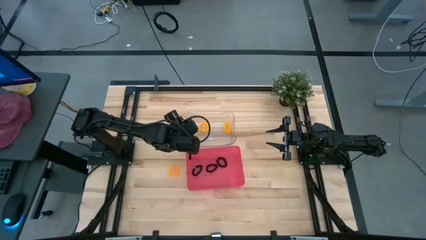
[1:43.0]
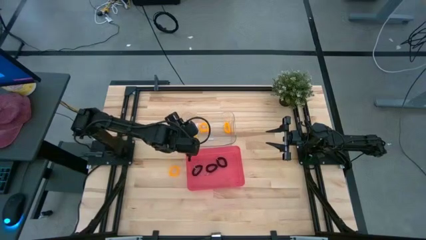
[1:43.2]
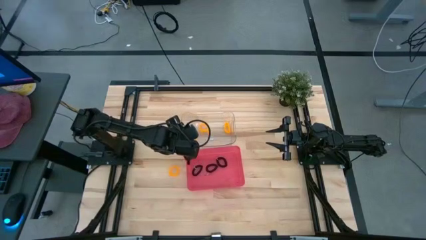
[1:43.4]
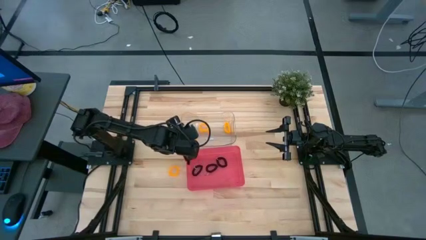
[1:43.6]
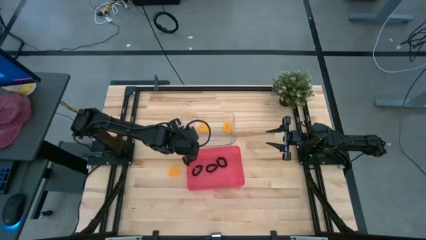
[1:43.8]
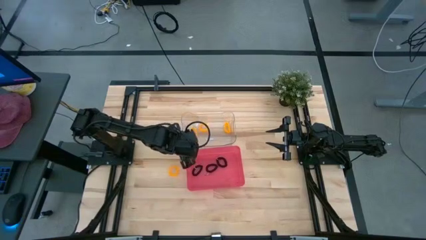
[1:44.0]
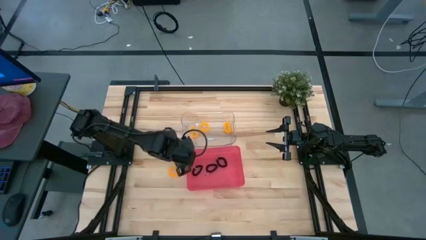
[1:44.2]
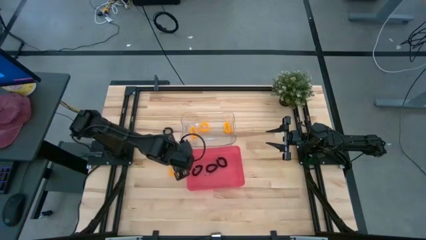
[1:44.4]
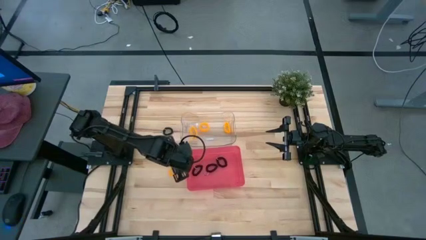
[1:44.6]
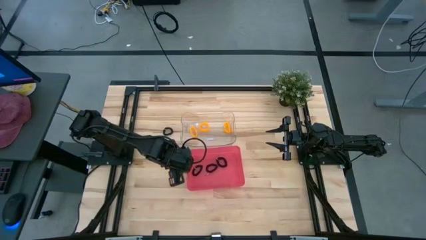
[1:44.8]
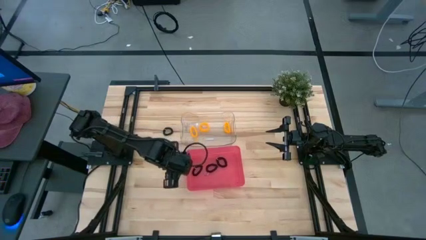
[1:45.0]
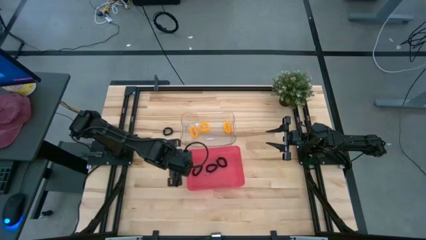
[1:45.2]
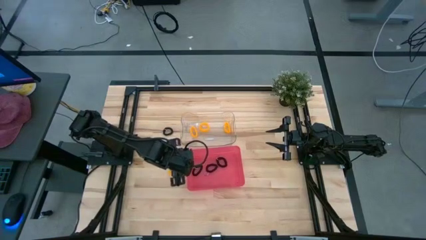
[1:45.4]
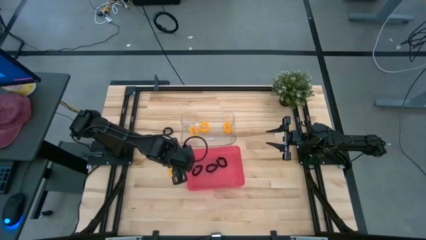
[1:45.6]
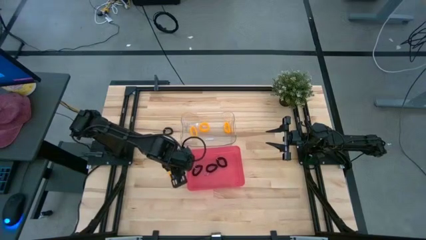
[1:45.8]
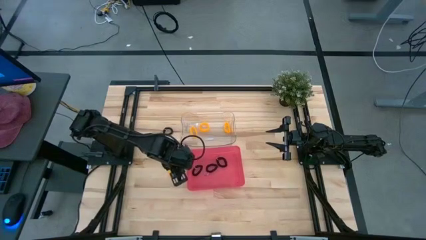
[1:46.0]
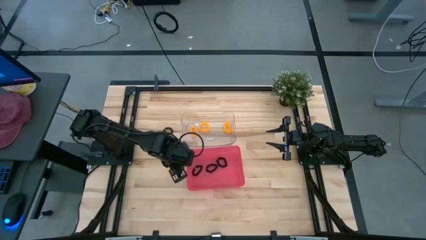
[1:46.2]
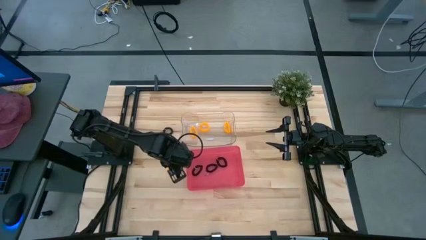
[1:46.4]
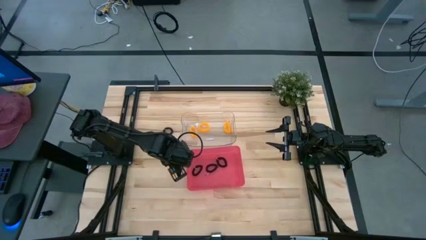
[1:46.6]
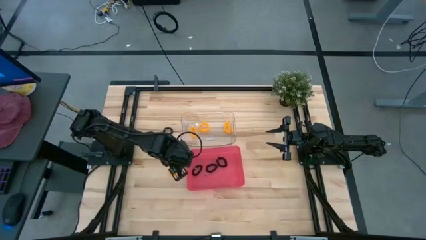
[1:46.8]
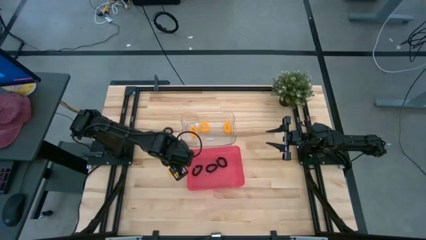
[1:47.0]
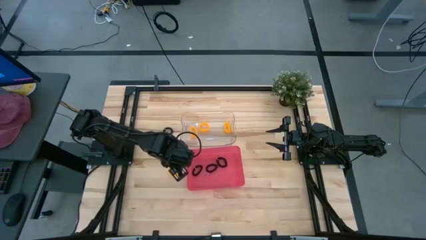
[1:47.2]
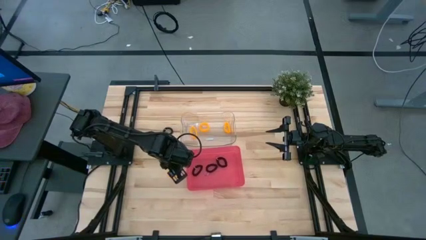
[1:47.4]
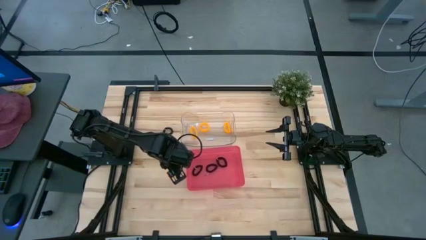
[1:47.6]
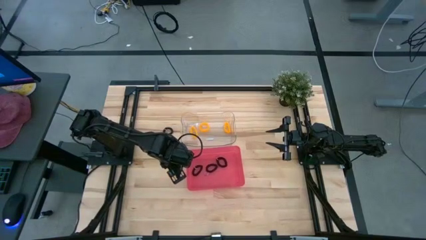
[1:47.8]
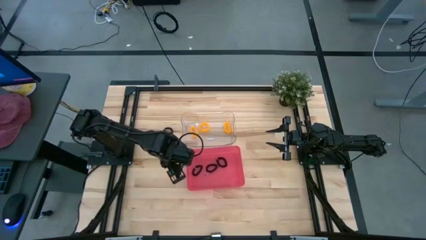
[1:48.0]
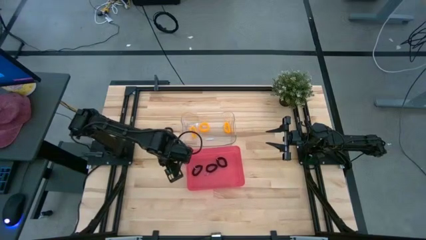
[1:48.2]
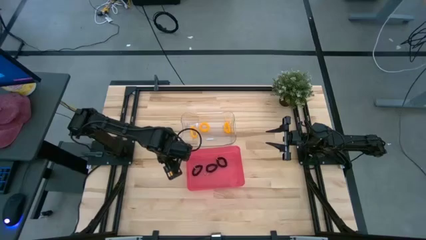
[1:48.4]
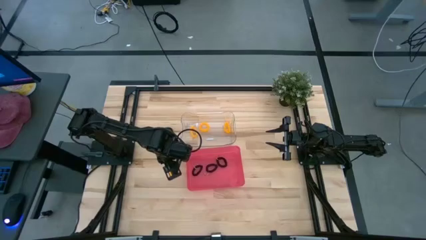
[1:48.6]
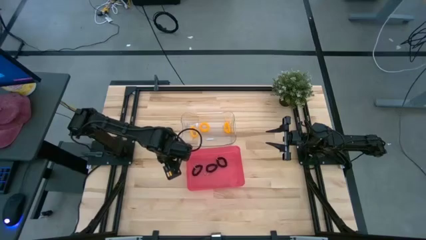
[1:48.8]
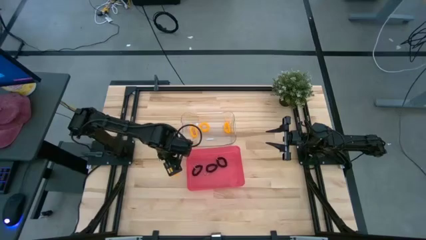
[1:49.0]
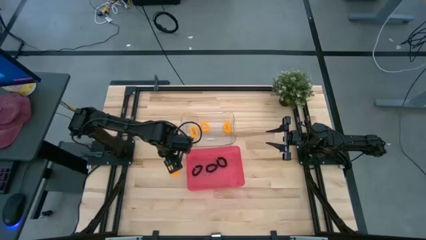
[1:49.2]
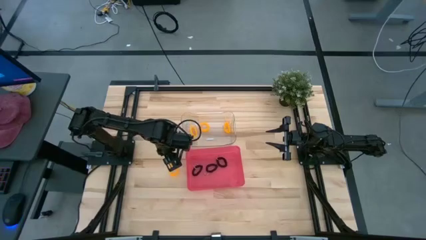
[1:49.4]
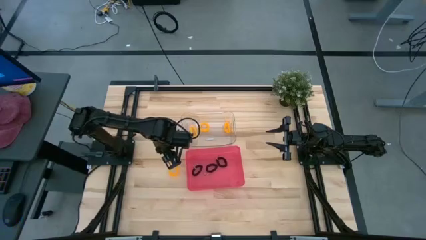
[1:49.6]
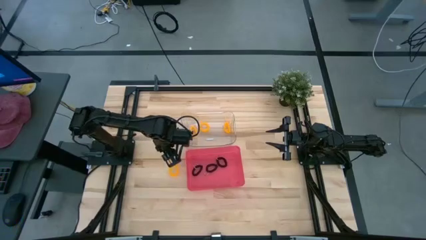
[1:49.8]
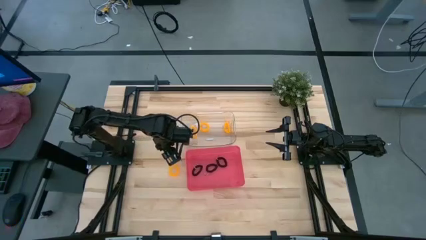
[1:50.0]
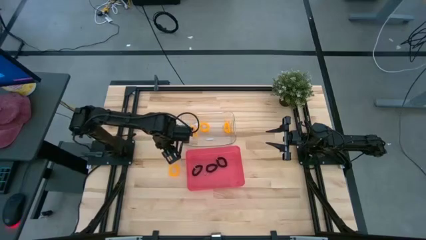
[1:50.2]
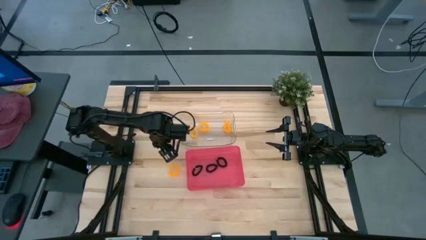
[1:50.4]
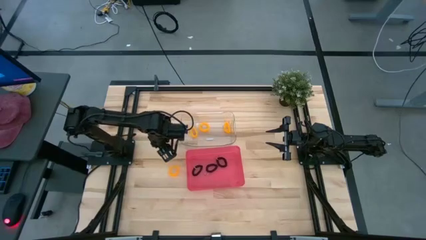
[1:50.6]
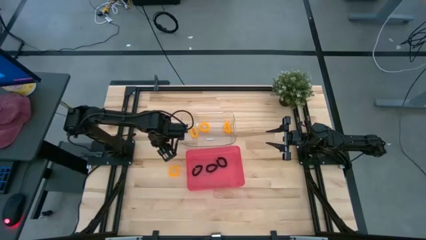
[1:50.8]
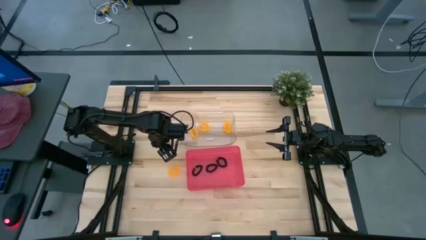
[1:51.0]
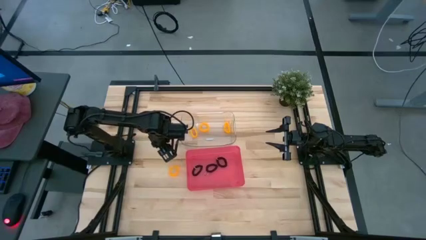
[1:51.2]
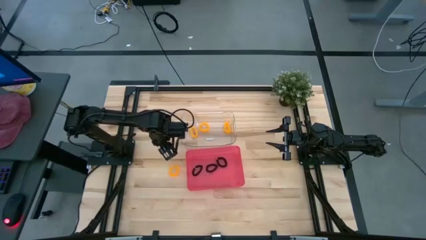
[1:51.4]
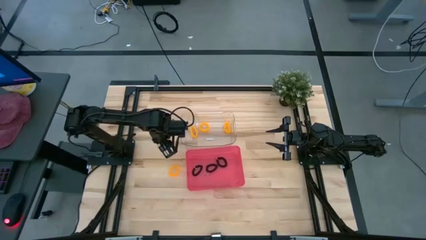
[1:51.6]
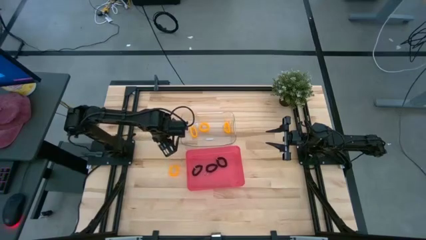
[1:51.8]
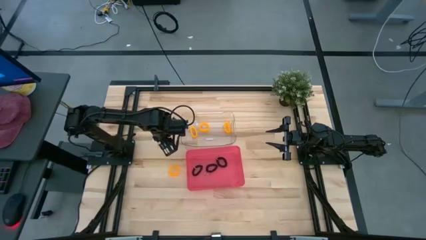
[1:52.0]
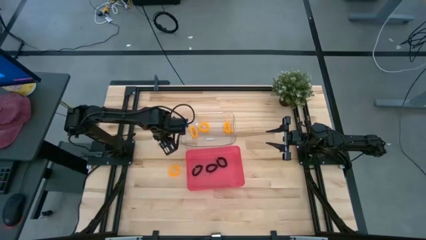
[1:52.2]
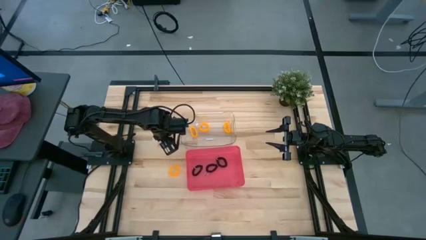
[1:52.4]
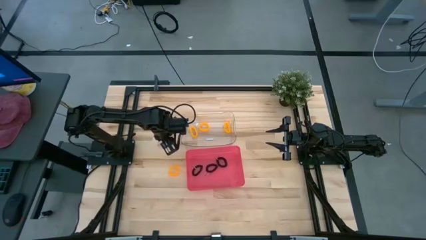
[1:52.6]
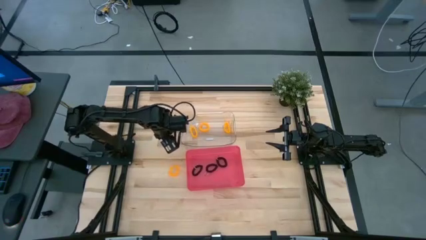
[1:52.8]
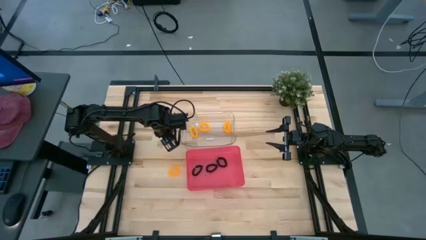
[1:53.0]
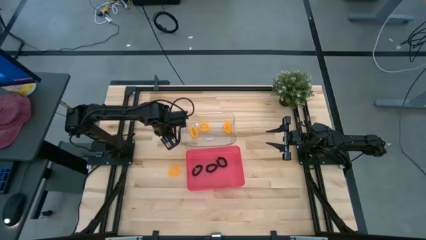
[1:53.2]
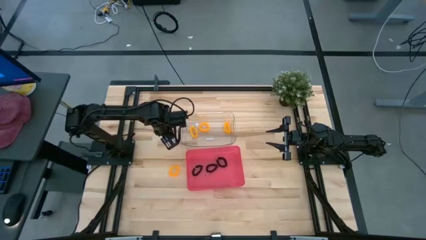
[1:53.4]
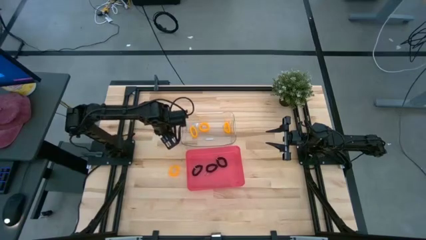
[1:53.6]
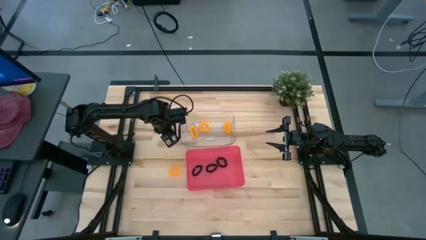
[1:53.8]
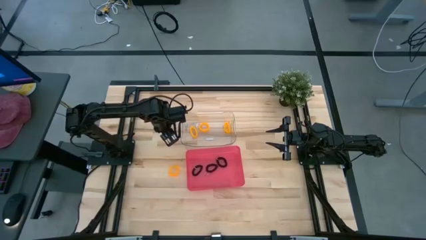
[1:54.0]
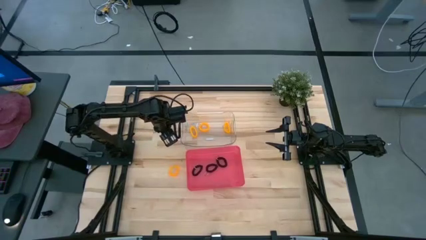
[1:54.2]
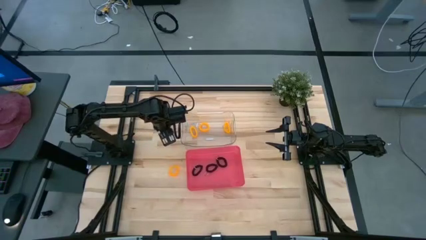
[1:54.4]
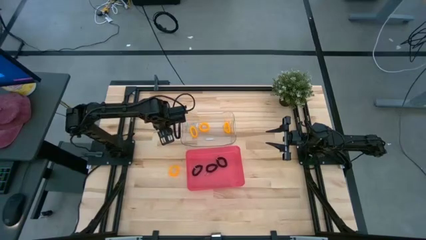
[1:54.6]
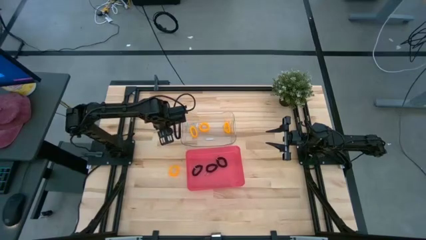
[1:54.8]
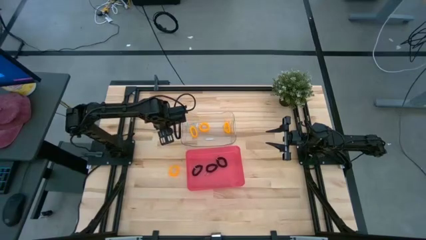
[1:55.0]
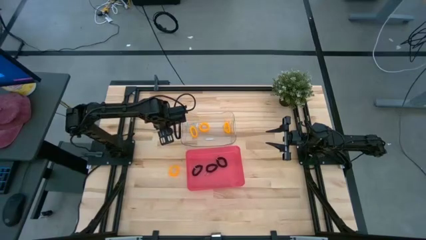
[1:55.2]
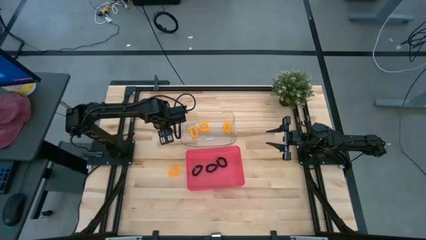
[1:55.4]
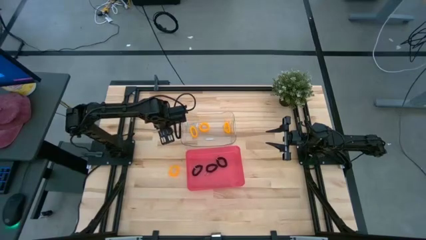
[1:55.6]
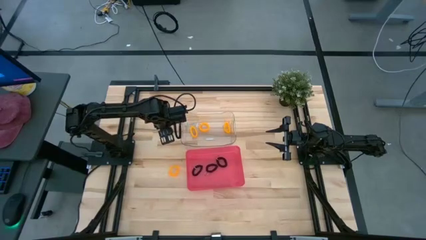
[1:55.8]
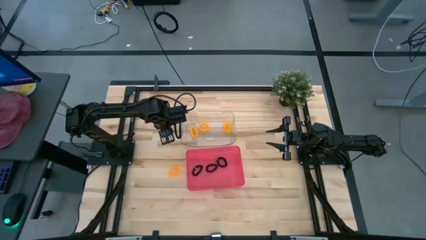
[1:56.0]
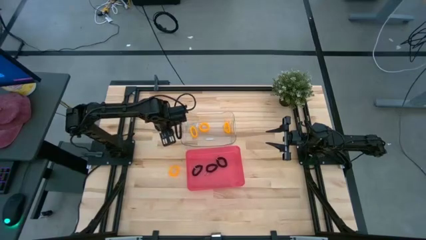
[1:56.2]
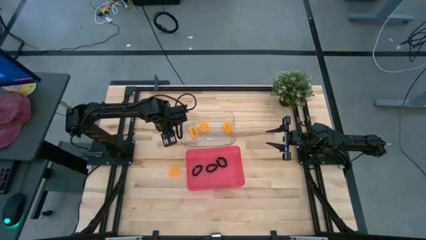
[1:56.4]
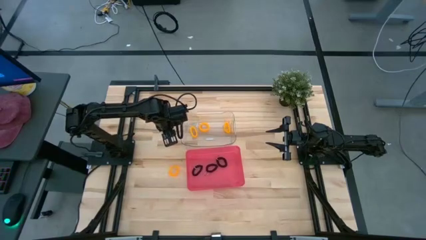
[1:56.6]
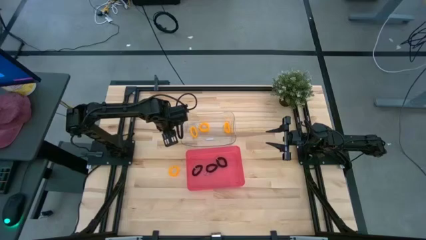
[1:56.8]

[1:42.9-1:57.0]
Task: Sort spring keychains
Put the black spring keychain into the red bin

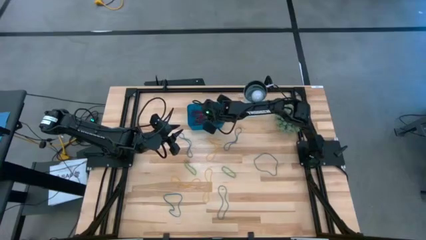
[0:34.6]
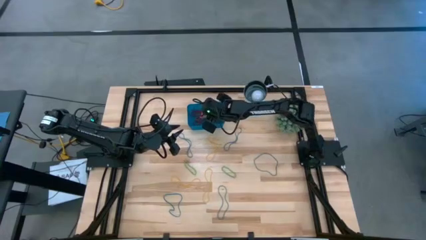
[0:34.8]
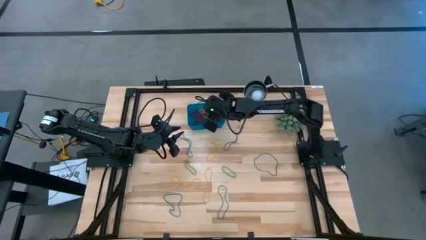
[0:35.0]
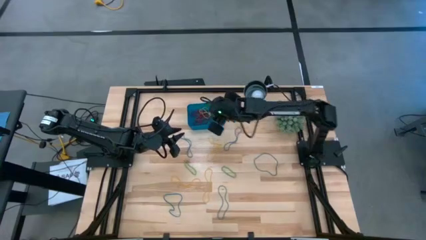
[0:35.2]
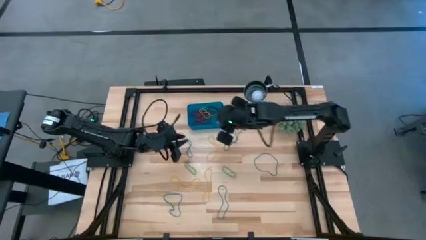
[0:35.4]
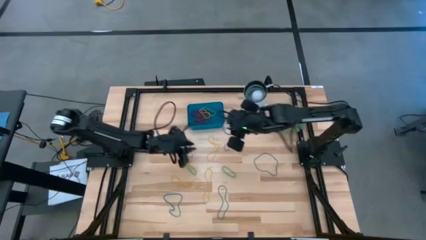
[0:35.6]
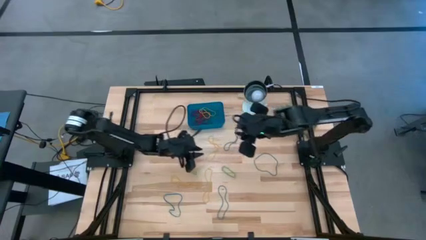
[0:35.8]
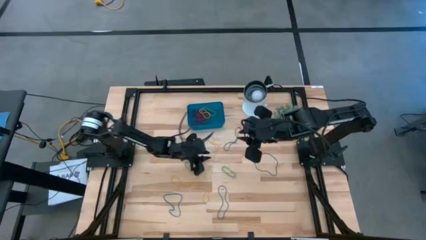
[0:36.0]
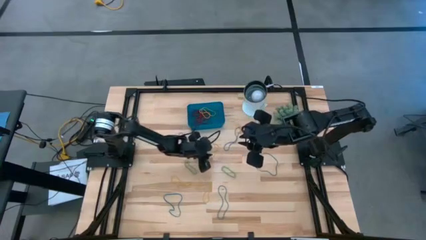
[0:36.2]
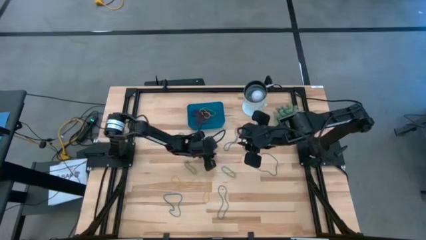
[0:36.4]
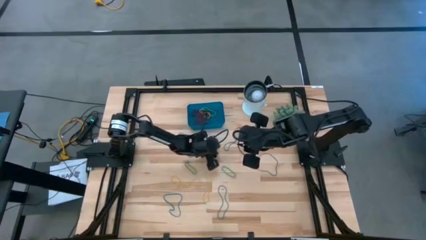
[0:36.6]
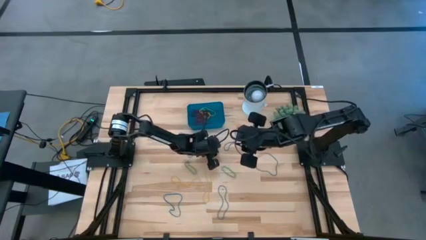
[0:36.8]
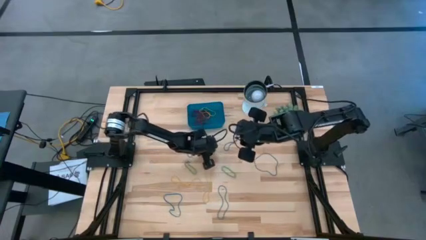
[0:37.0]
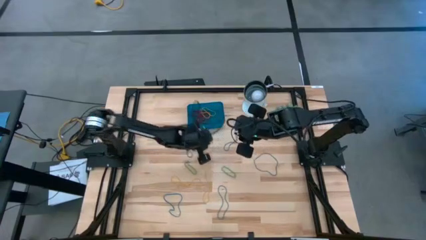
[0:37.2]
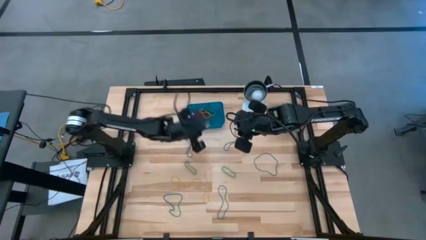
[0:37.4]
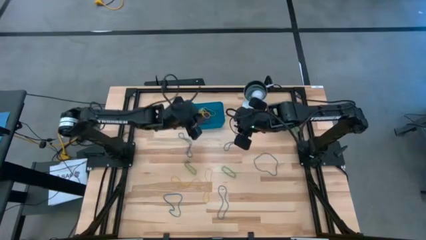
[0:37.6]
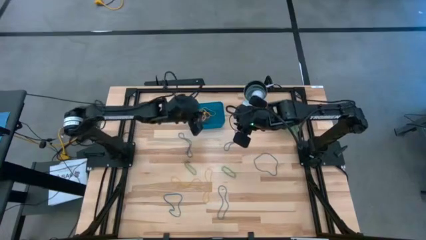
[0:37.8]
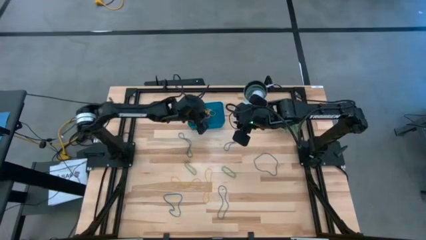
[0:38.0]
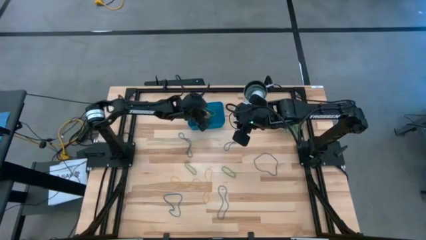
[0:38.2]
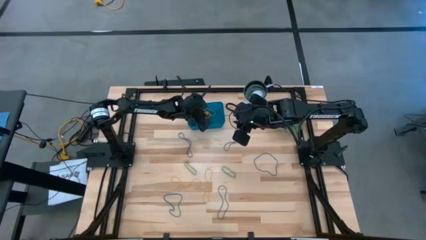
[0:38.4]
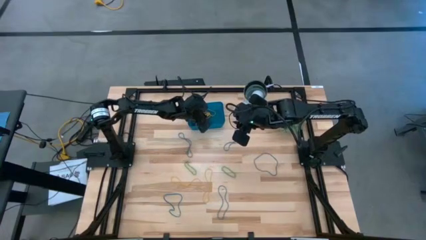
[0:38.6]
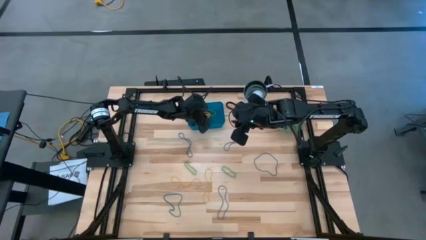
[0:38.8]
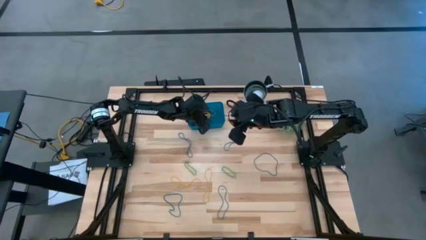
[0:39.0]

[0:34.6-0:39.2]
Task: Pick and place items into bin
Put the yellow rubber band into the blue bin
